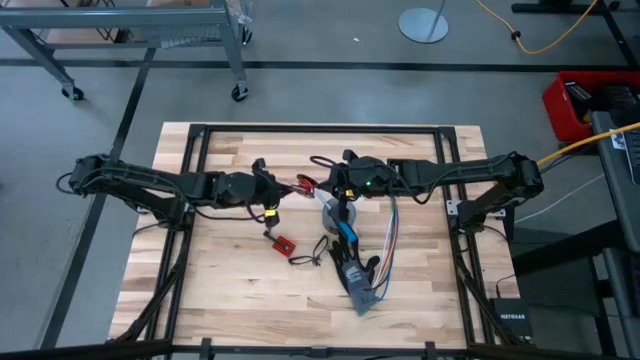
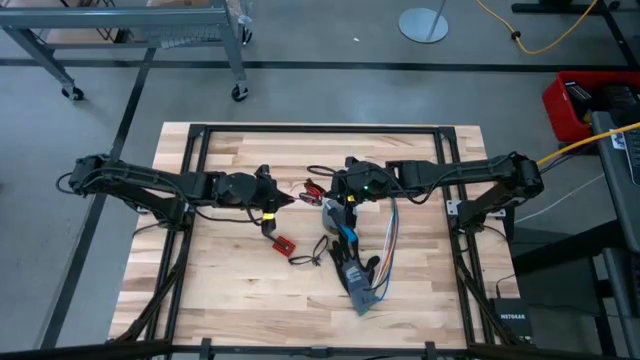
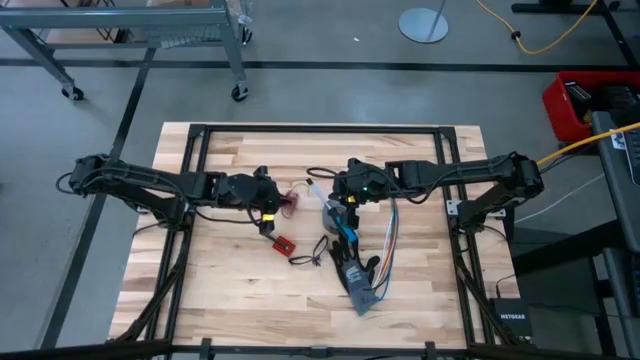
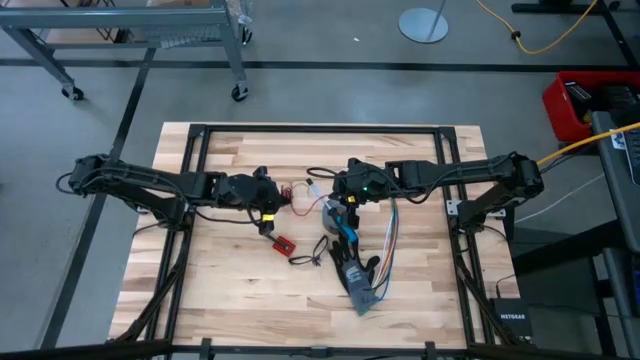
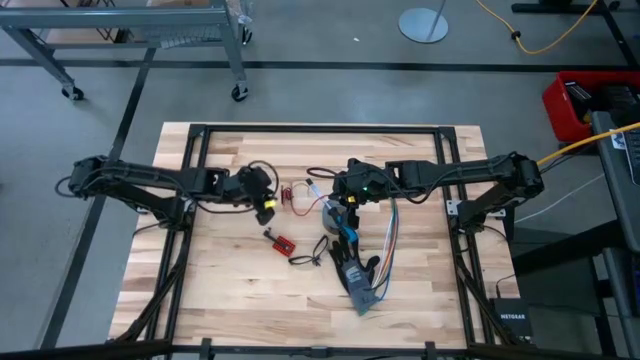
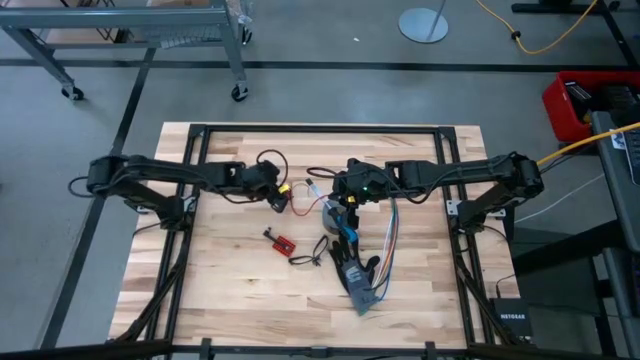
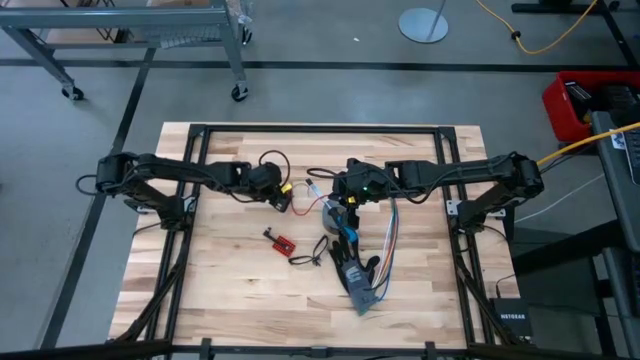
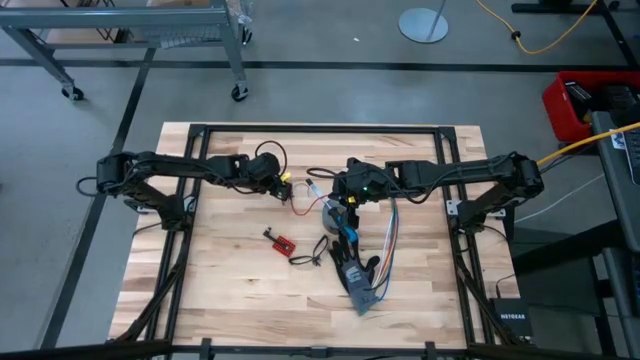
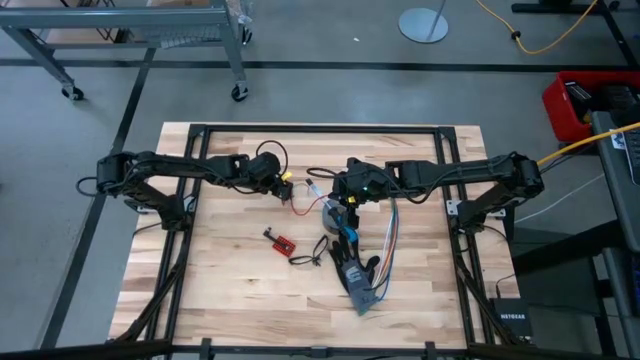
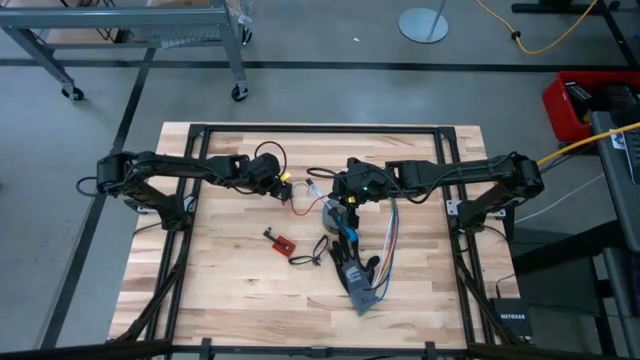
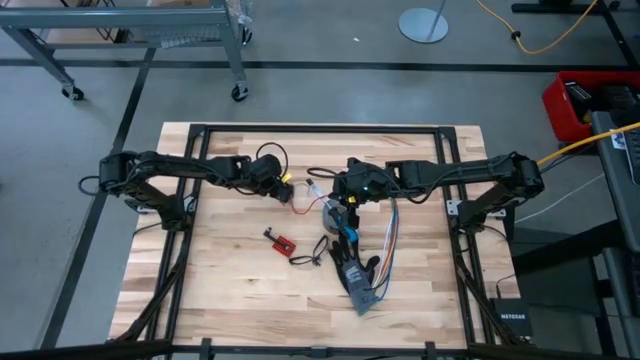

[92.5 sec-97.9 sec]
Task: Coil cords
Coil the red wire around the spool

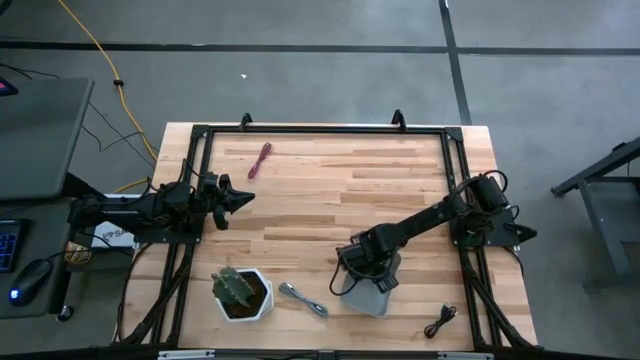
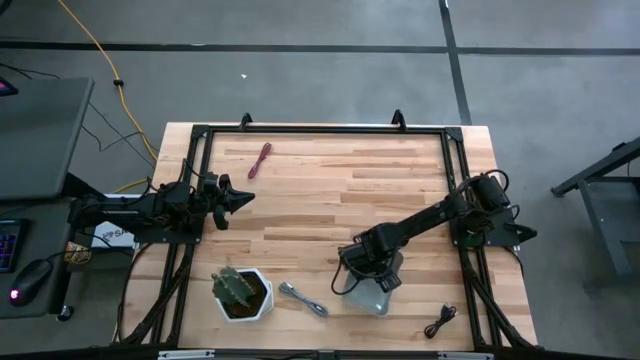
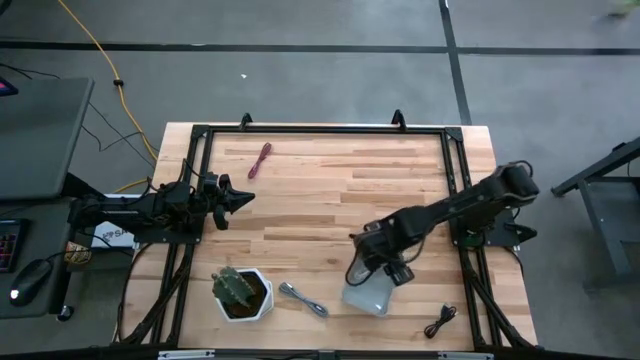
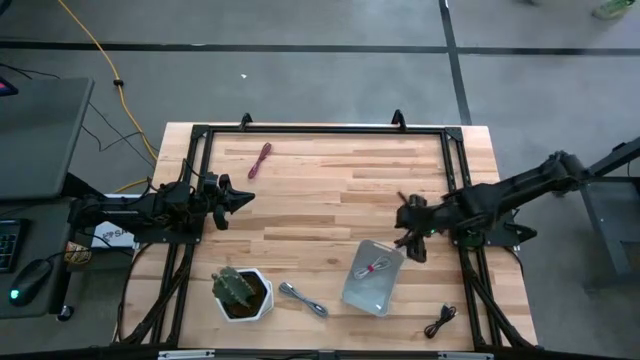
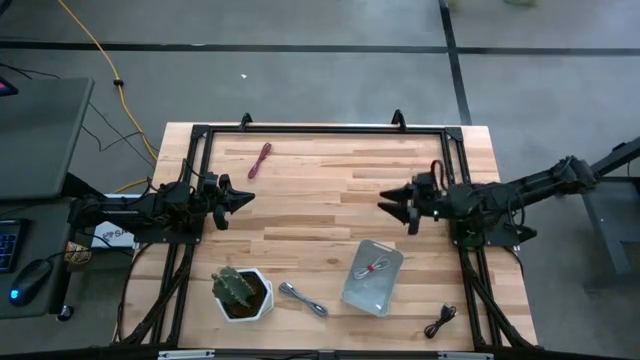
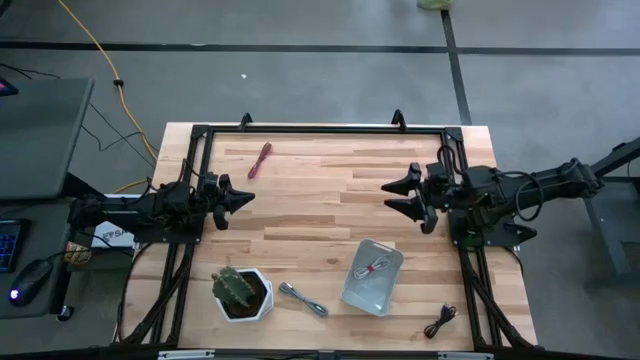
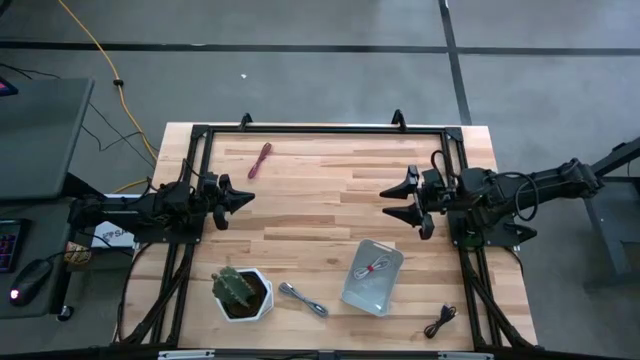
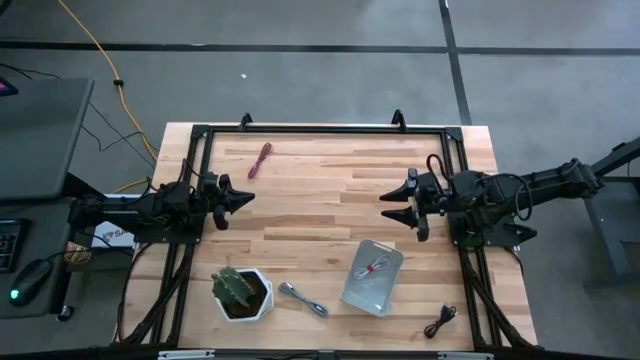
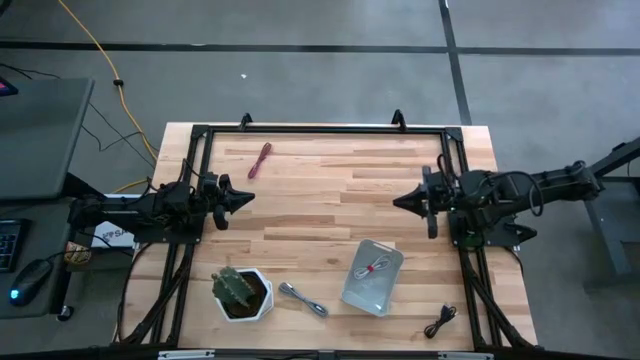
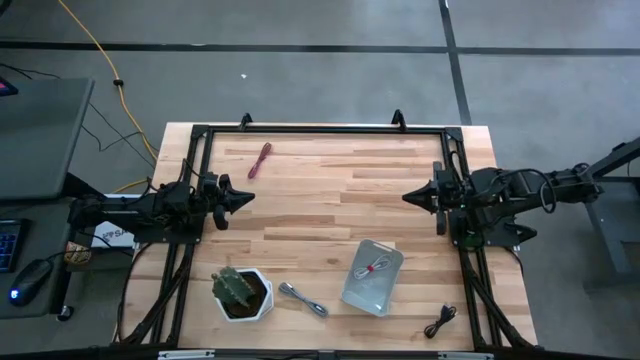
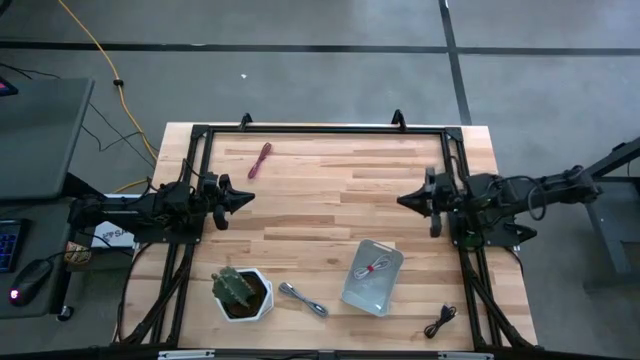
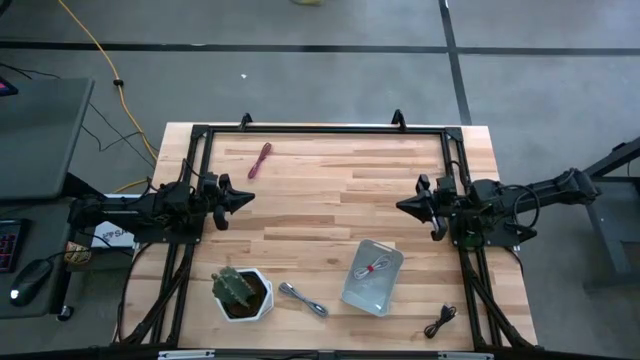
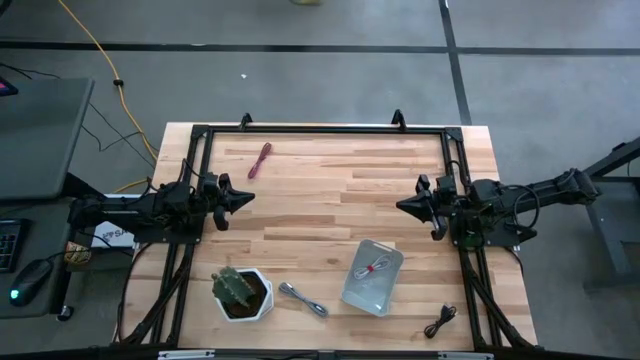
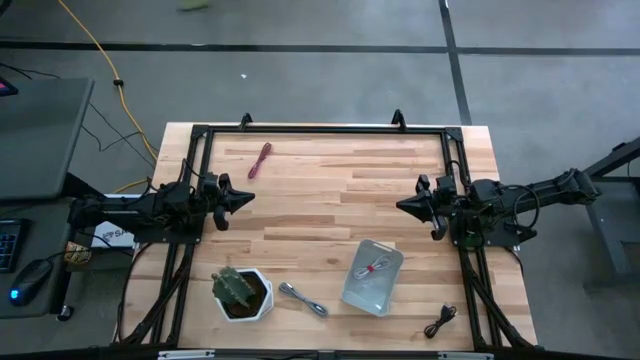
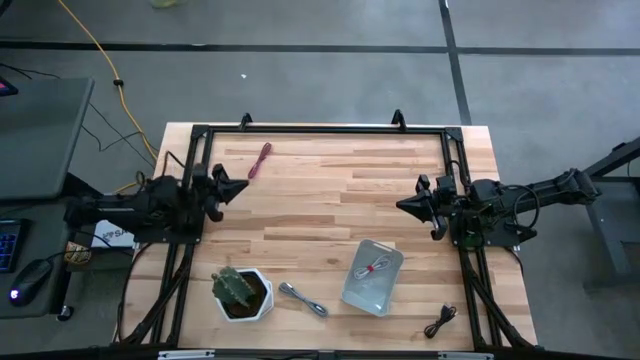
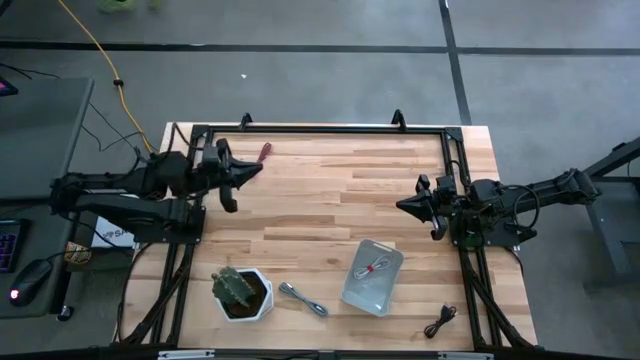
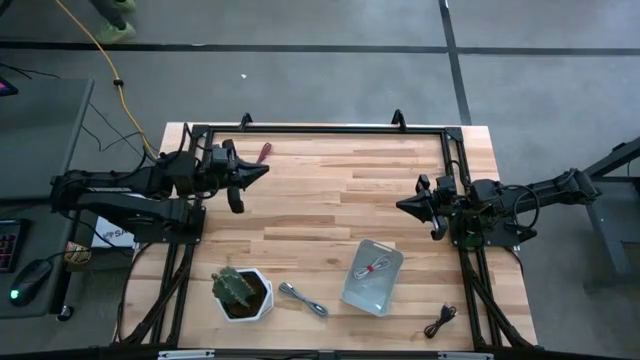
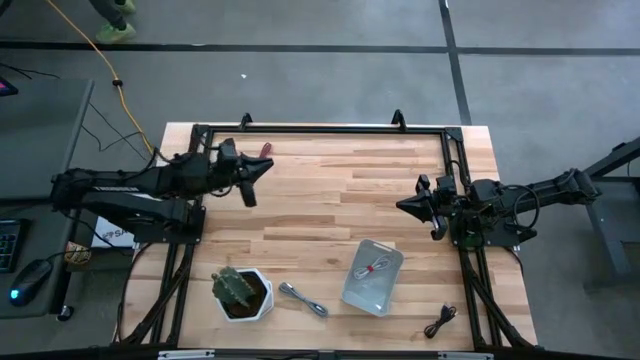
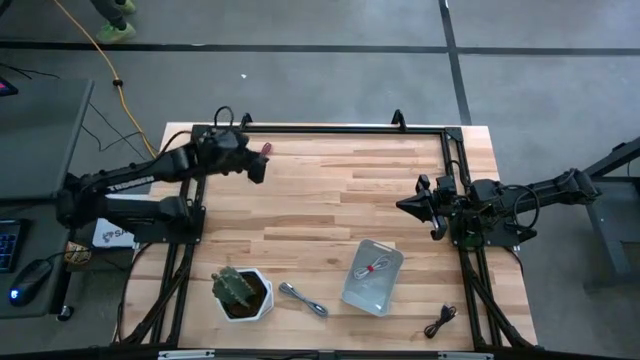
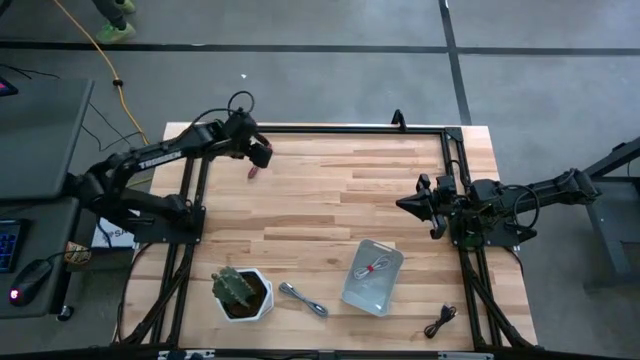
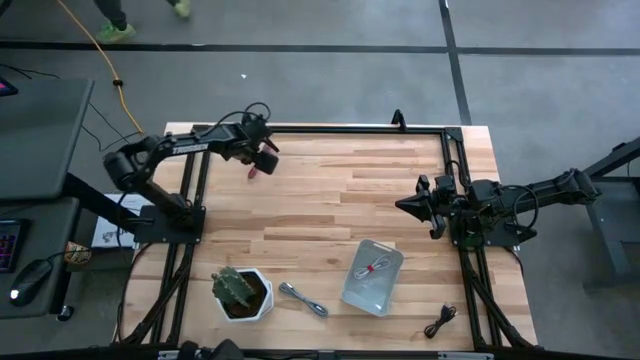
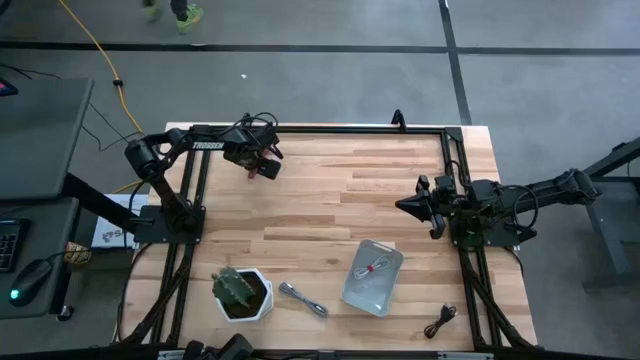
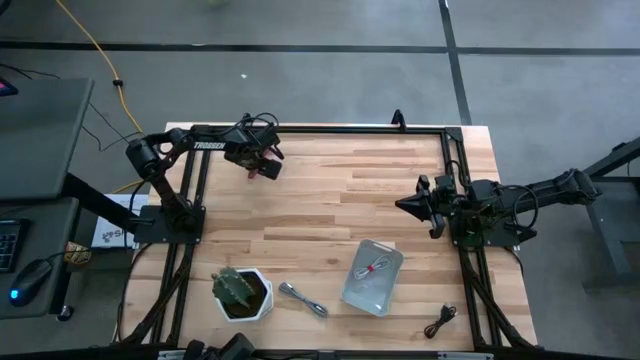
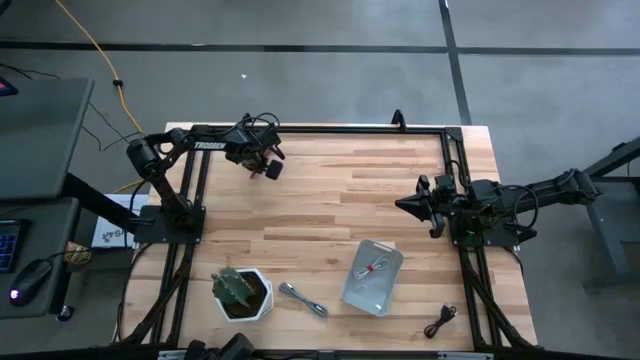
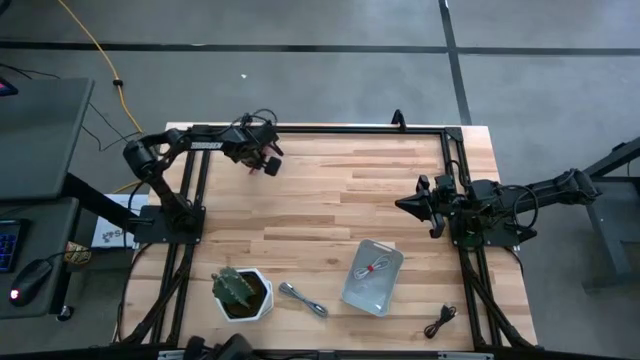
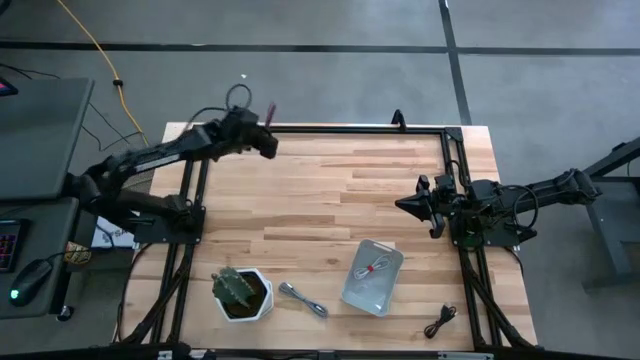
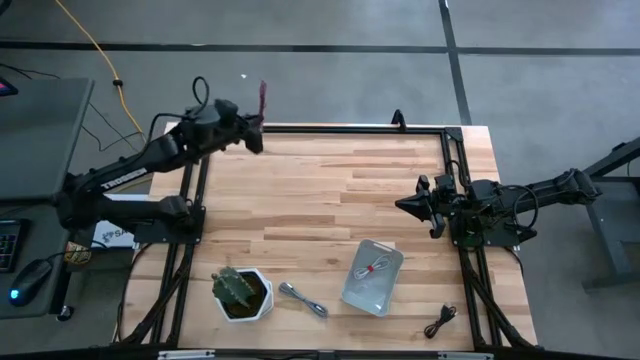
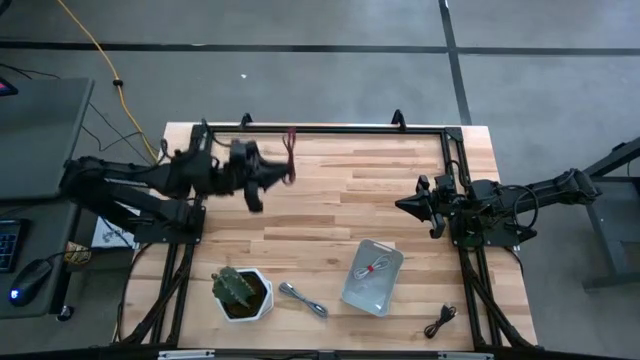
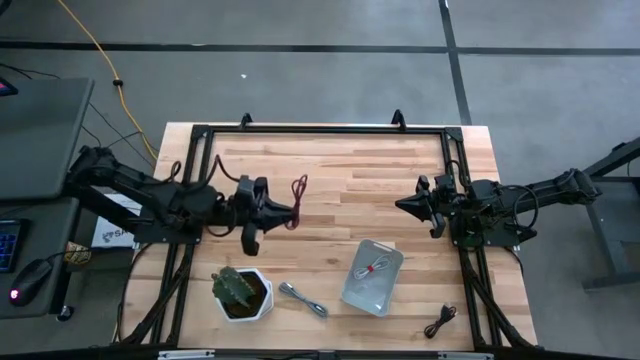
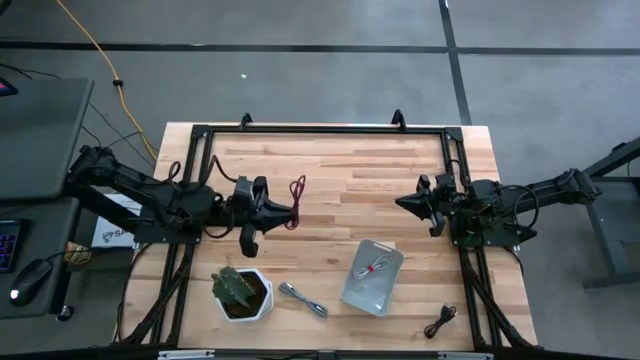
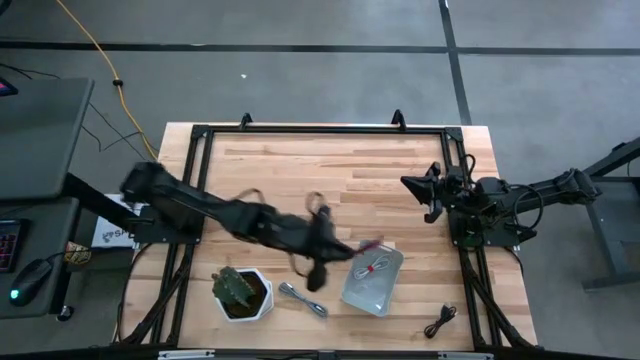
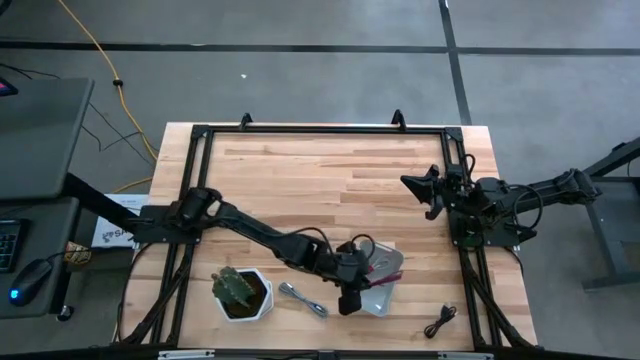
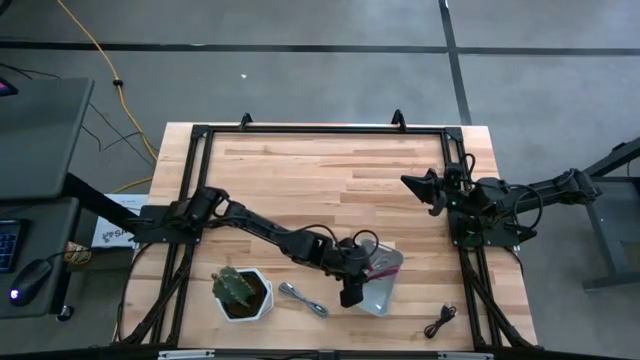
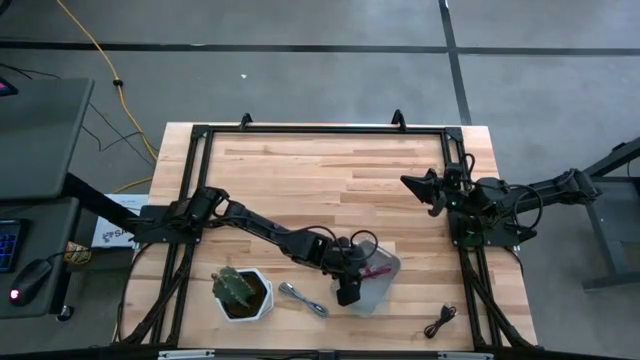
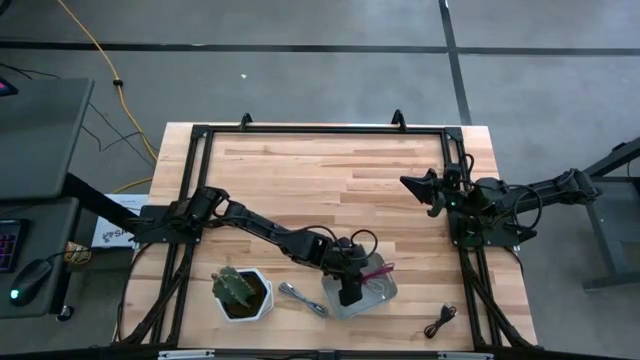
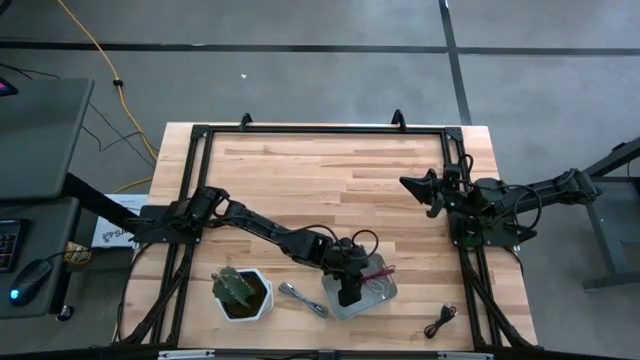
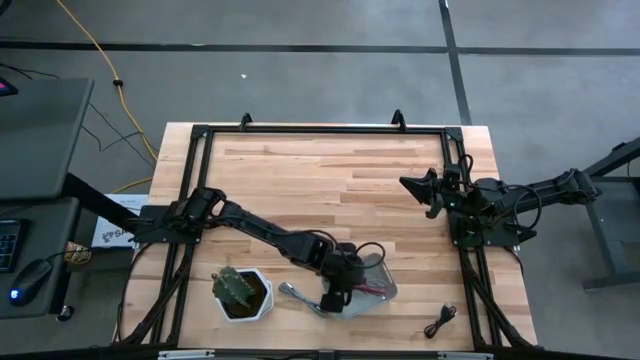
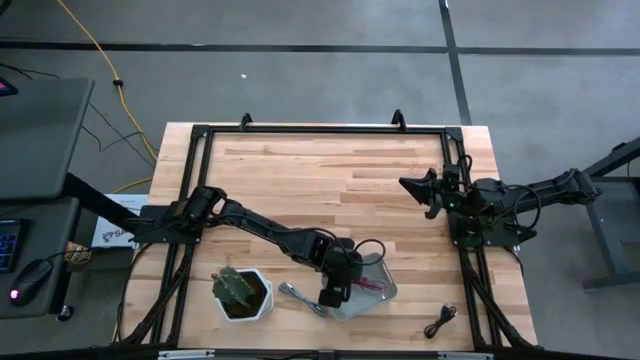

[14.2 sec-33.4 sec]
Task: Pick and place USB-C Cables
Put the pink charger cable into the gray bin
